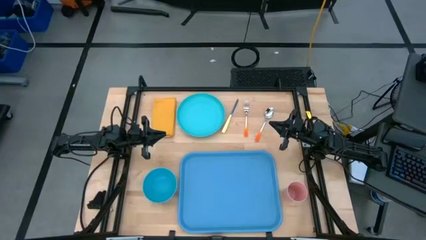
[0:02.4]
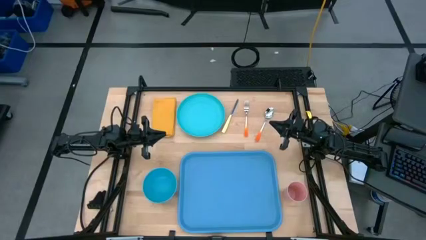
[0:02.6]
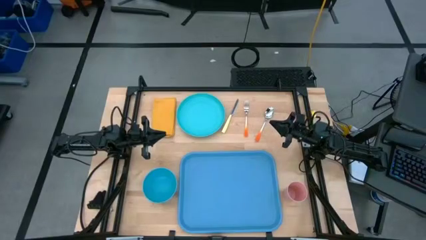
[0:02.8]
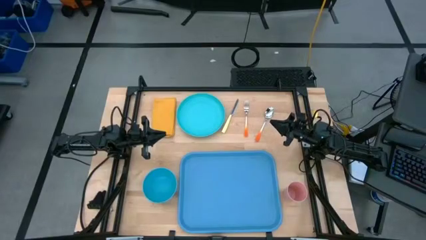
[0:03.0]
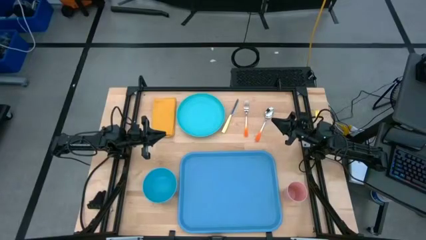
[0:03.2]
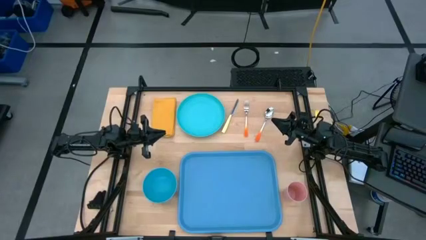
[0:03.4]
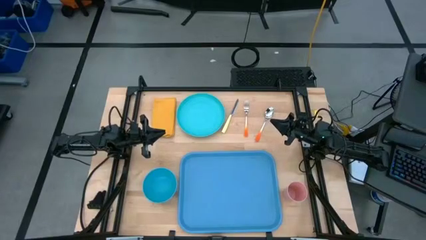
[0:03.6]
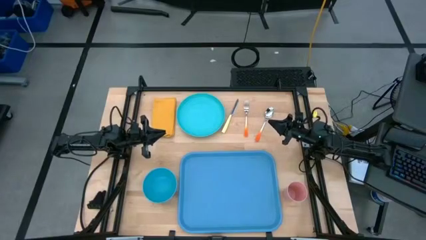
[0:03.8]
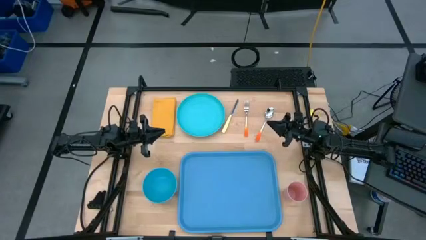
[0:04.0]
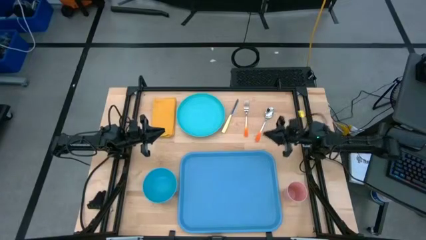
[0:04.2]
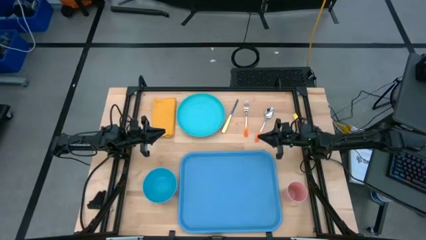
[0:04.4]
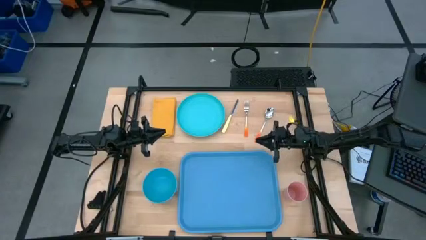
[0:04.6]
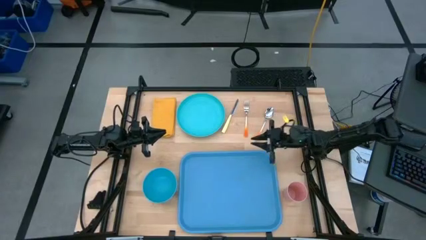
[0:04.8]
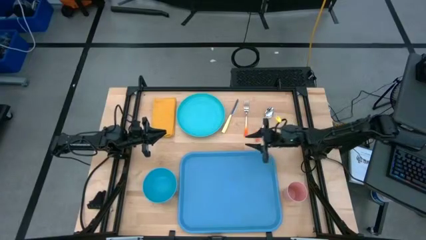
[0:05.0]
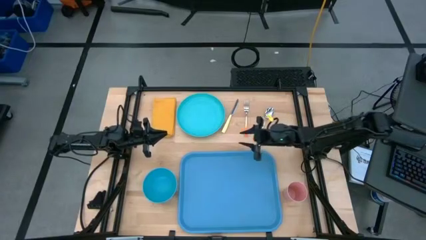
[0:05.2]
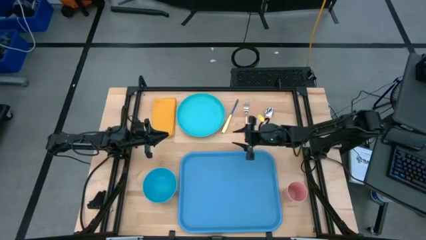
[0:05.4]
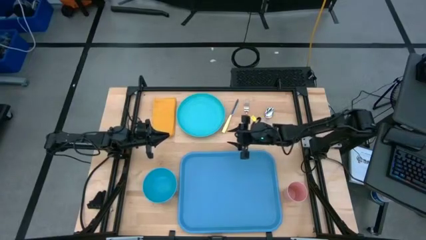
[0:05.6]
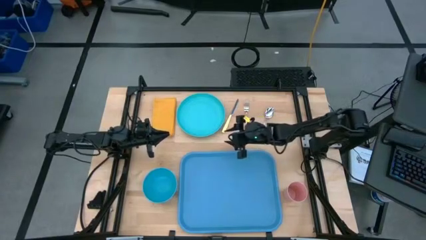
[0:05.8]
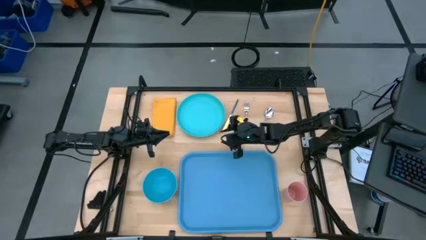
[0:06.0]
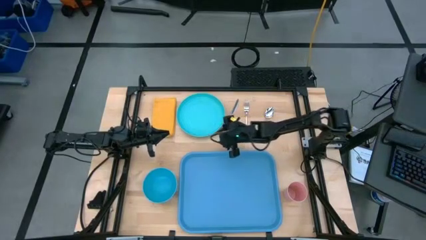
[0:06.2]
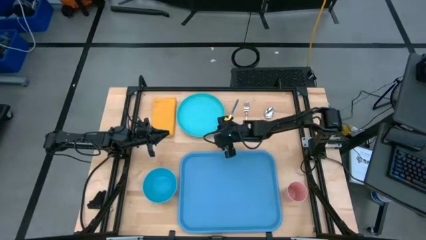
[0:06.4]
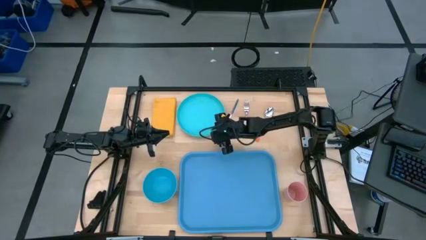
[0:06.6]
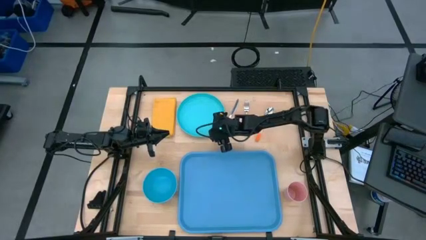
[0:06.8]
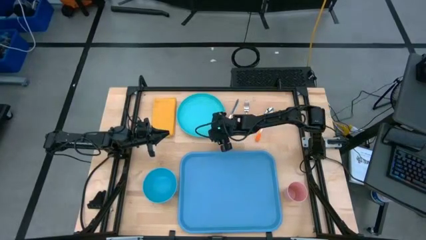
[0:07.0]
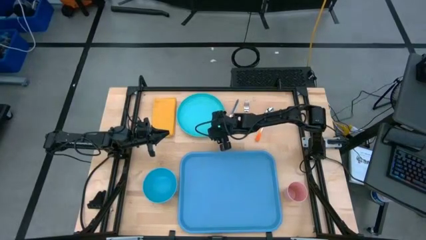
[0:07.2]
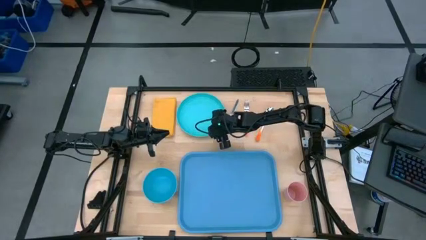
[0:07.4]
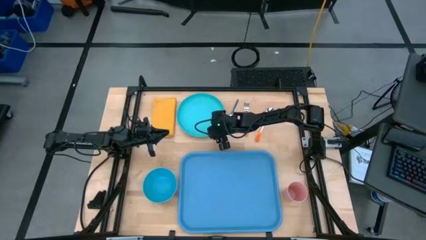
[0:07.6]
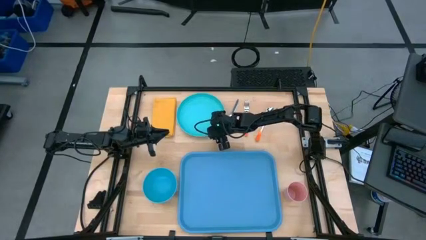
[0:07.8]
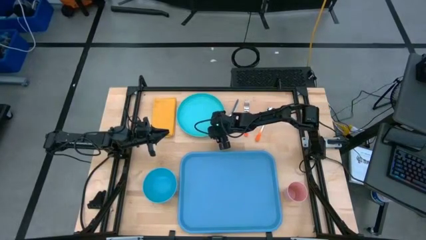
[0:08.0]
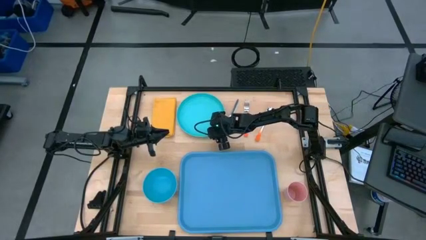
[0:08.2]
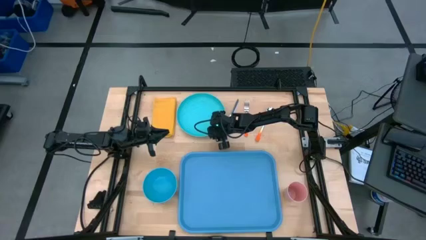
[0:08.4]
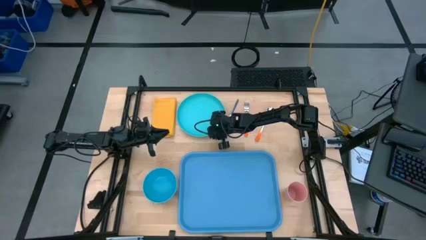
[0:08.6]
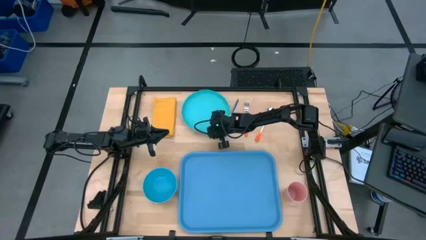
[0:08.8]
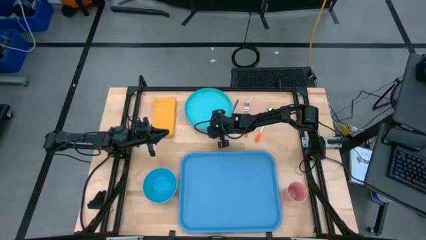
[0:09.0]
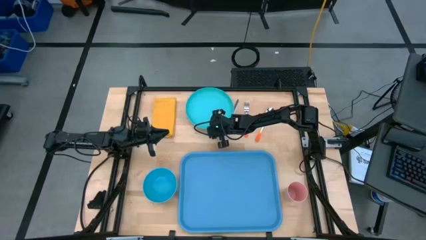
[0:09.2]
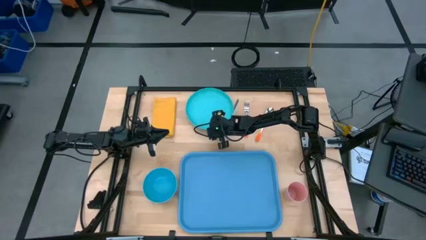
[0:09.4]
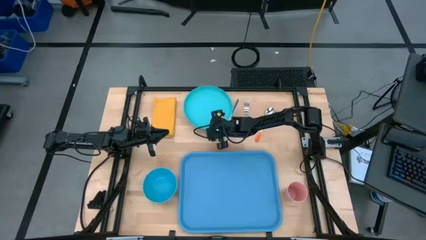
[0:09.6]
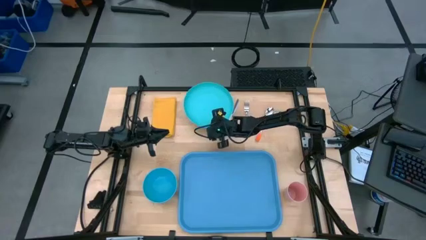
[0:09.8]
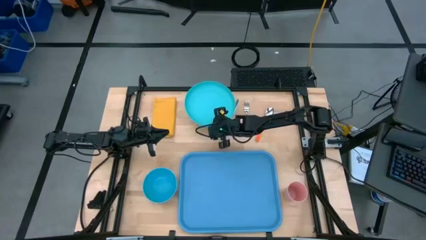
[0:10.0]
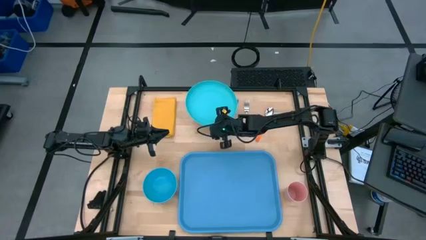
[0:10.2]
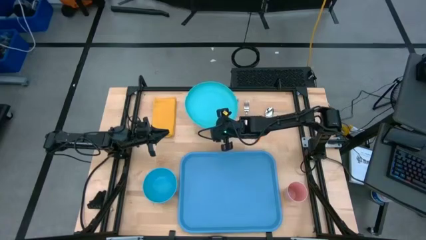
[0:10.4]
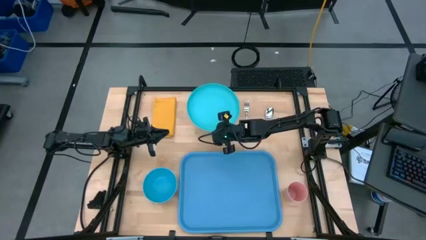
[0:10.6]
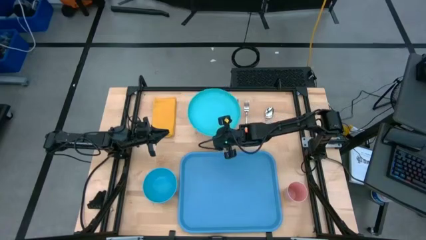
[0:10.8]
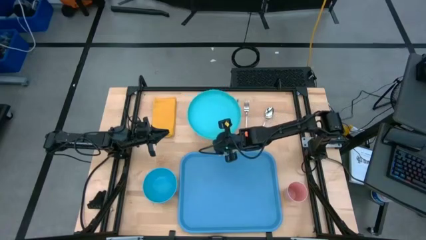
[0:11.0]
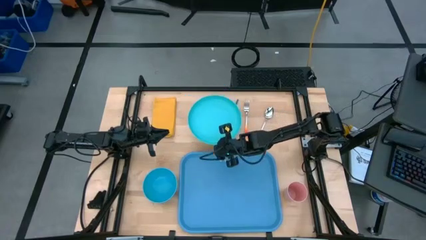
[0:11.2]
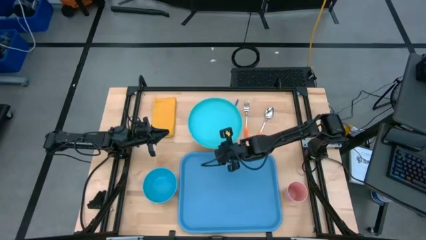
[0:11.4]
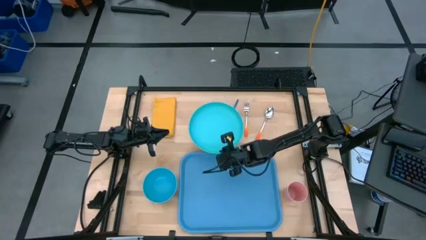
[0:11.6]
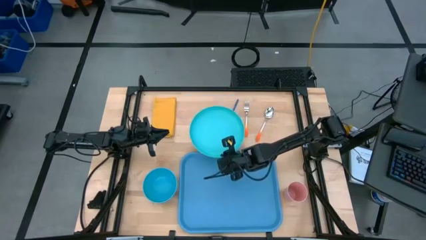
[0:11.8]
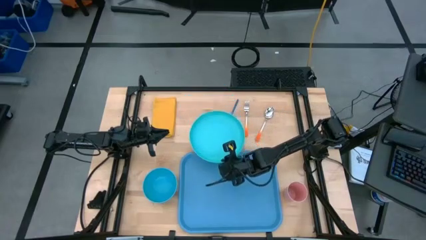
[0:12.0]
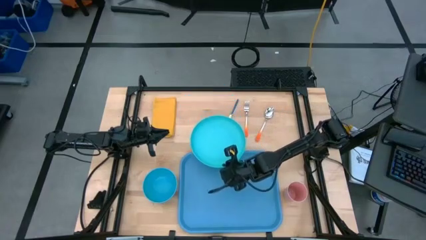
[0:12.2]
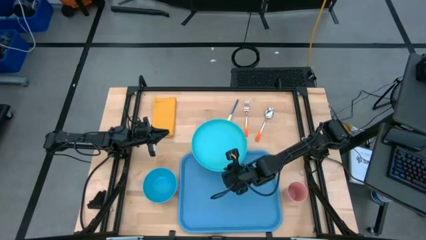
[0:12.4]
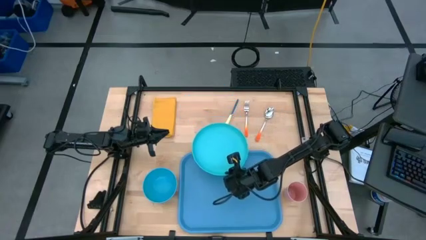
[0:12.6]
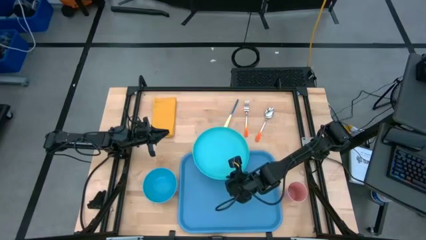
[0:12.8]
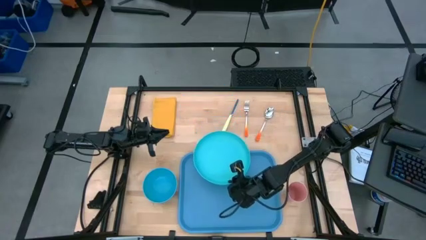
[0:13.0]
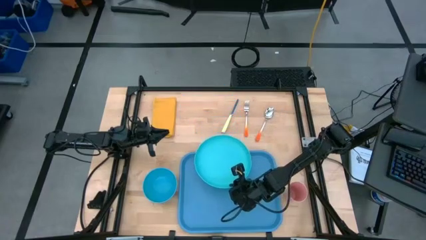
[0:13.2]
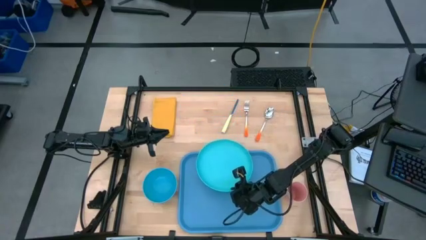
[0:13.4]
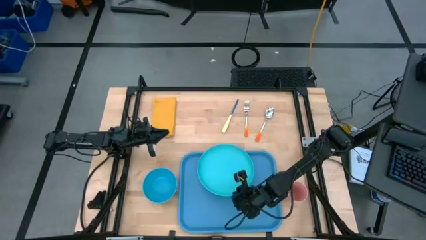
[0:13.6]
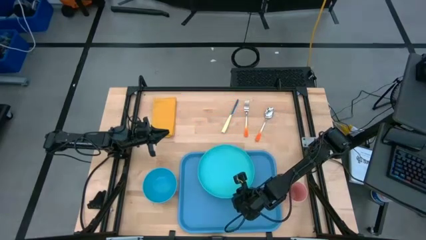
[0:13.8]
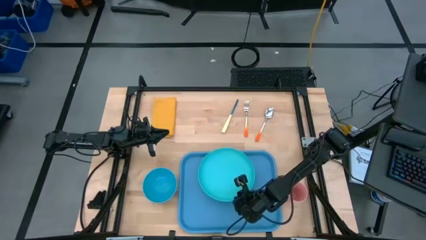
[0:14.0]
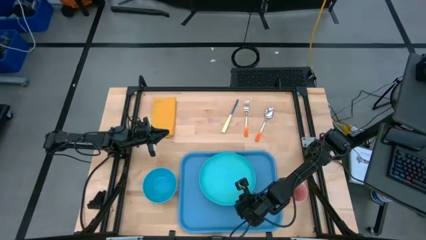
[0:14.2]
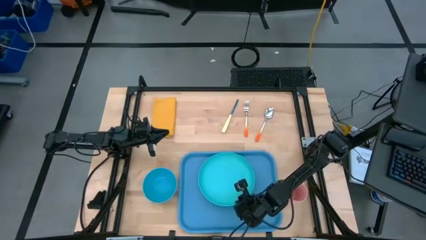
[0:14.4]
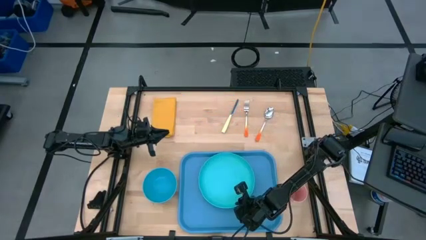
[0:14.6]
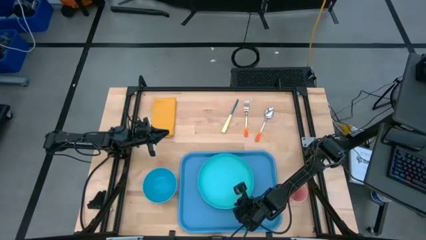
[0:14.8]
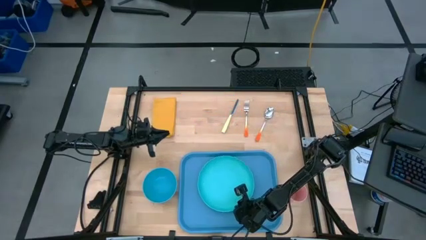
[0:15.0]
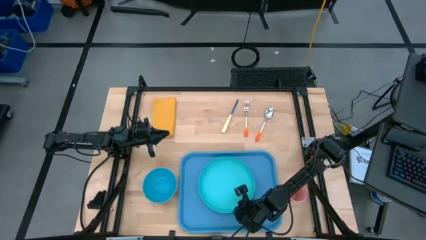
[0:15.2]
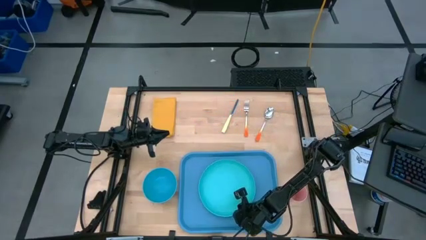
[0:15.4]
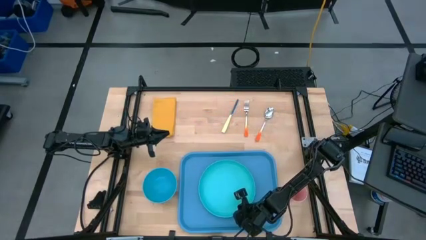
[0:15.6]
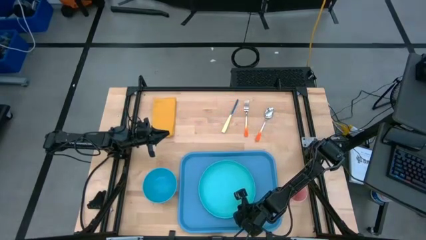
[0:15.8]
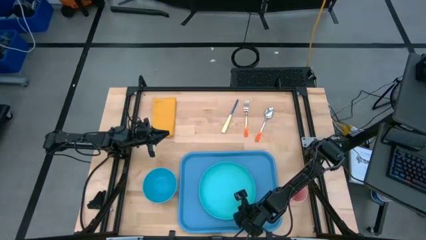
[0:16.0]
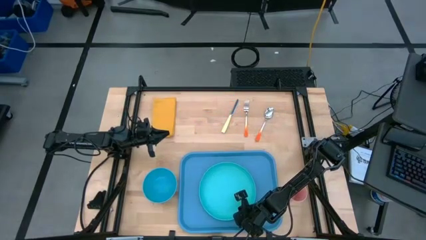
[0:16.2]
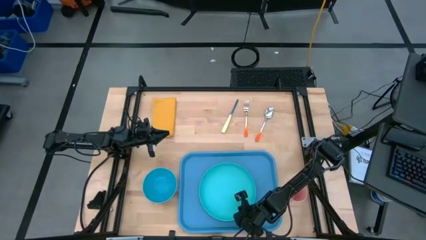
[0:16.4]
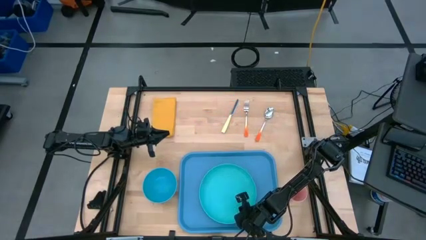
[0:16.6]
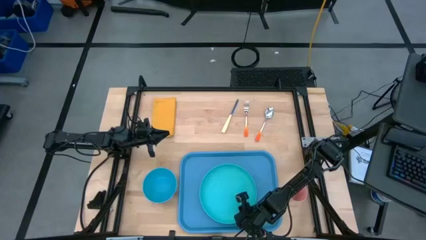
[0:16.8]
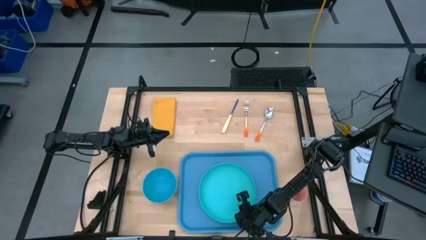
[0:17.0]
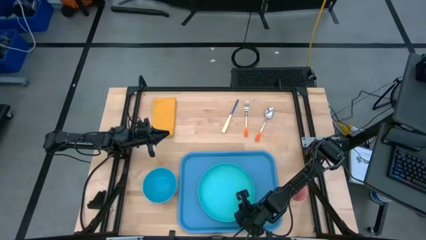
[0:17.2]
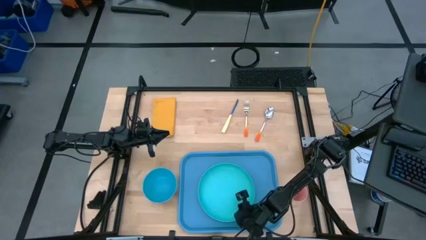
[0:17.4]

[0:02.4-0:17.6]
Task: Set up tray
Put the green plate on the blue serving tray
